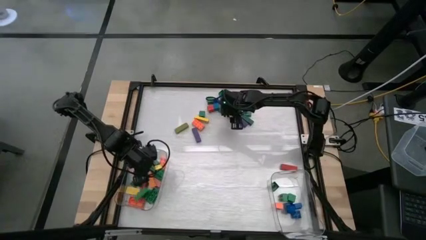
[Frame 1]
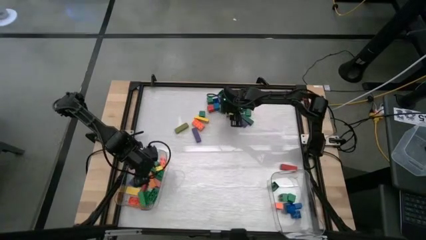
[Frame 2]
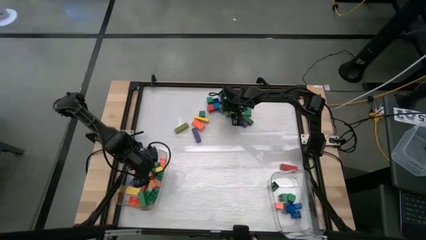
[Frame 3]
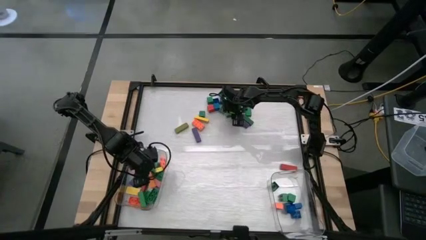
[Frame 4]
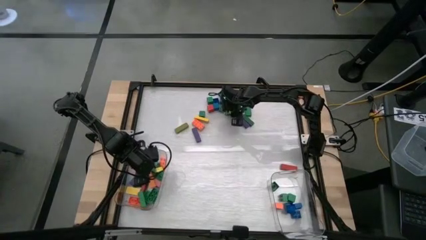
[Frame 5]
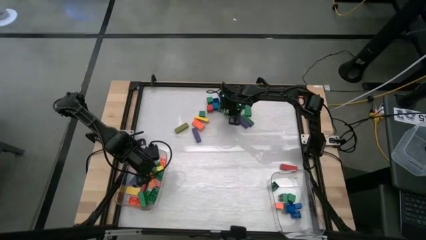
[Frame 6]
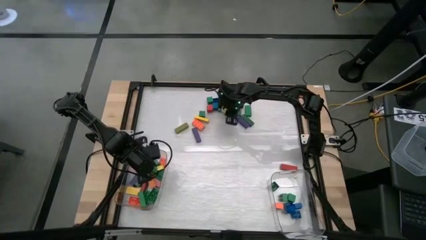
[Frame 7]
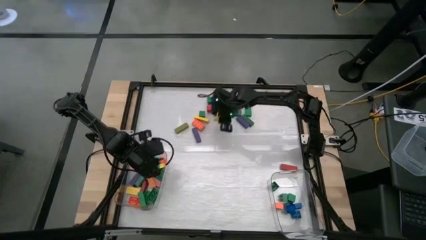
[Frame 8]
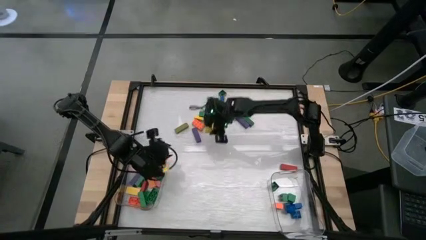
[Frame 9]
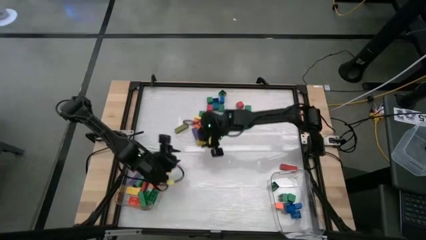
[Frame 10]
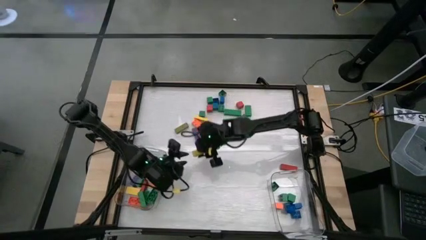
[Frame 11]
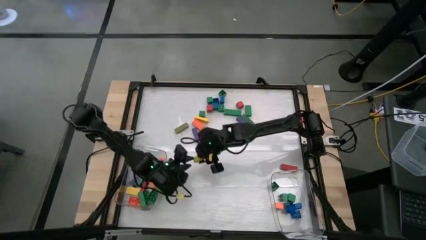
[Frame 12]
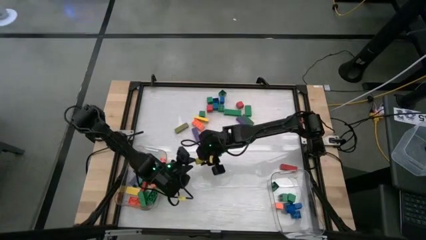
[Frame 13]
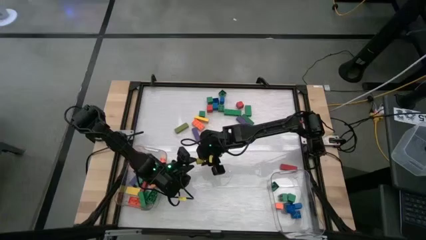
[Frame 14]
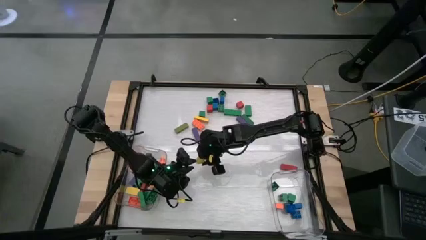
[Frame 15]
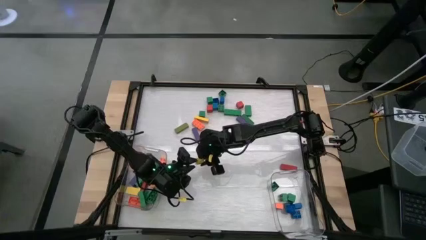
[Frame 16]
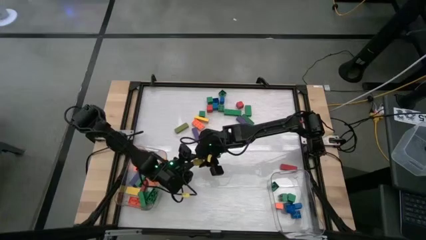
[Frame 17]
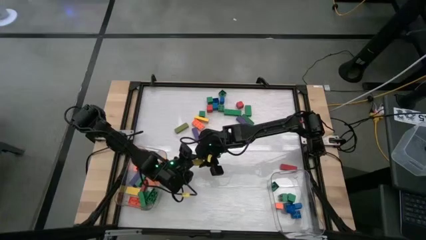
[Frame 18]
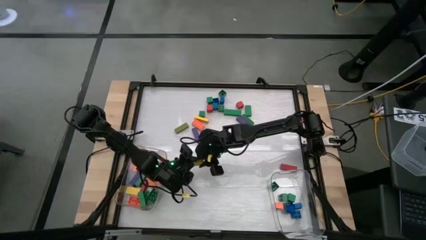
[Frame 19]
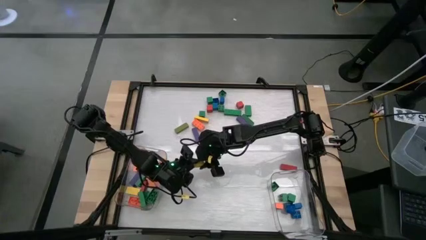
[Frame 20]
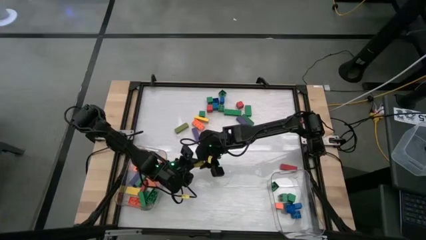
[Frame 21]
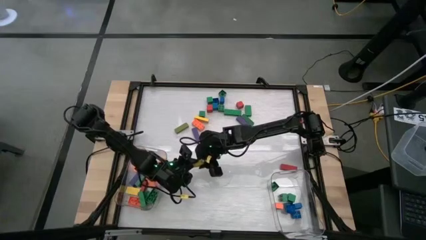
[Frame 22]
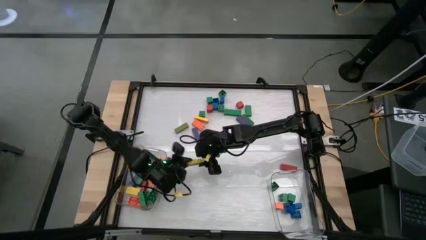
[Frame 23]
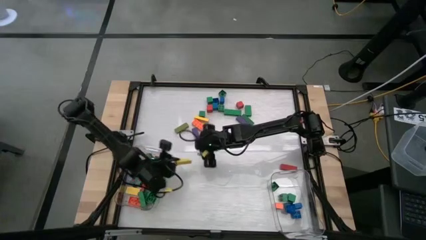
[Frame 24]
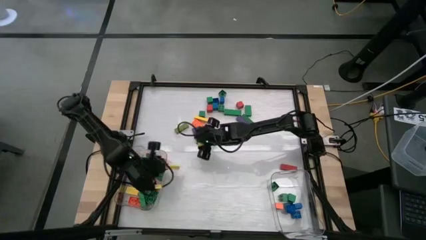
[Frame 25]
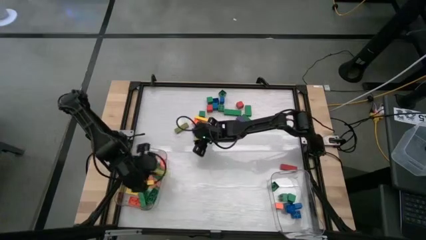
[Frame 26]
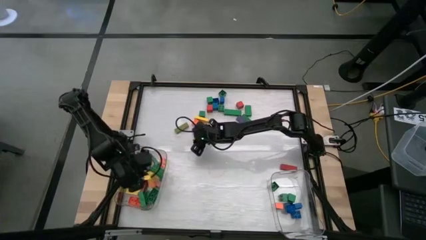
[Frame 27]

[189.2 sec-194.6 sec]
Task: Sort blocks by size
Put the large yellow wooden block into the left transparent bin

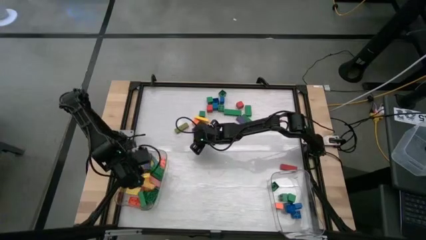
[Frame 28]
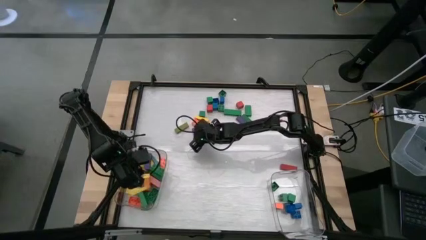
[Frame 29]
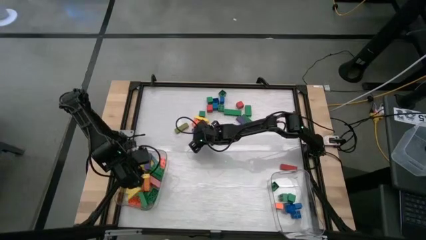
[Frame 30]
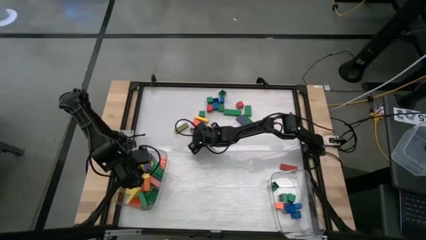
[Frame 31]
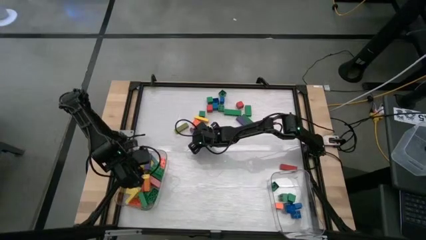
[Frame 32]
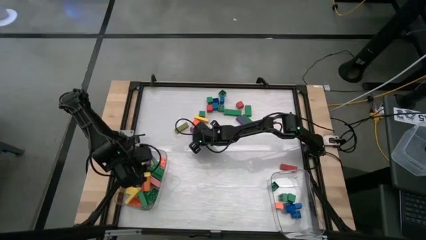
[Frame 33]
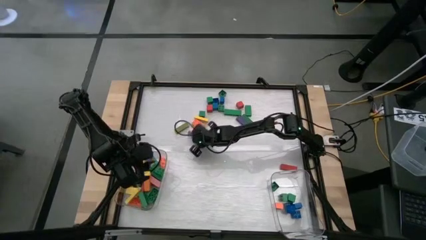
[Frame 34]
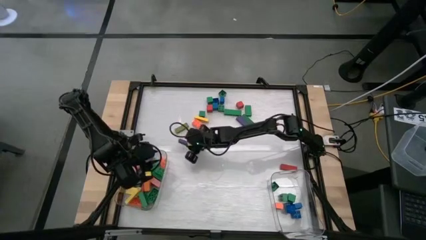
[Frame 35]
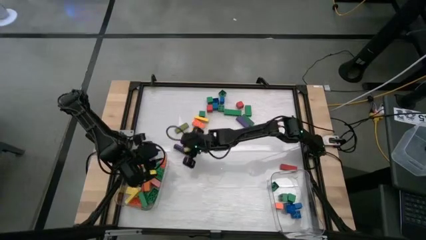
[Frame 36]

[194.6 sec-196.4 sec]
Put the large violet wooden block into the left transparent bin

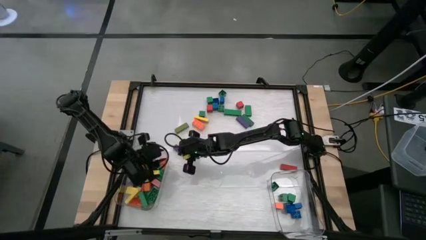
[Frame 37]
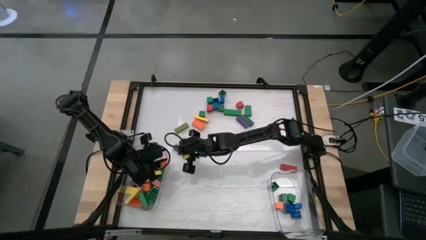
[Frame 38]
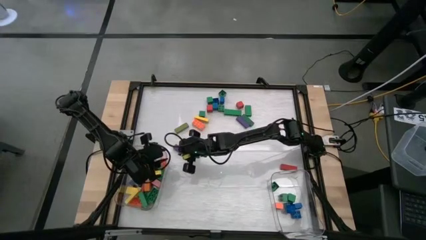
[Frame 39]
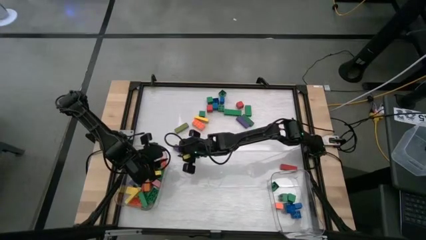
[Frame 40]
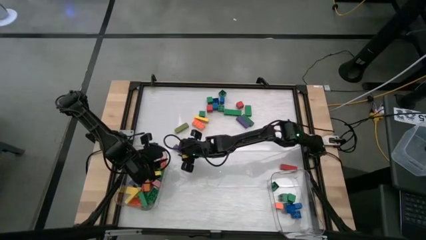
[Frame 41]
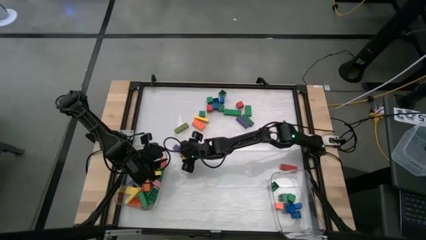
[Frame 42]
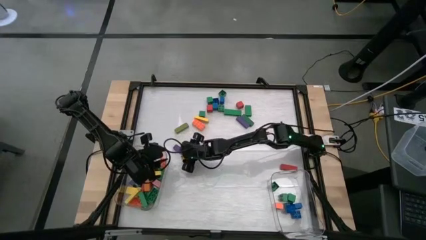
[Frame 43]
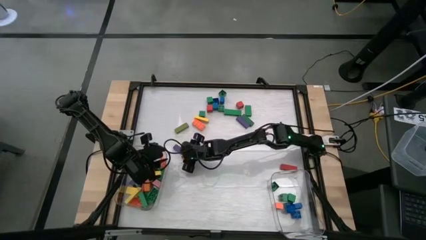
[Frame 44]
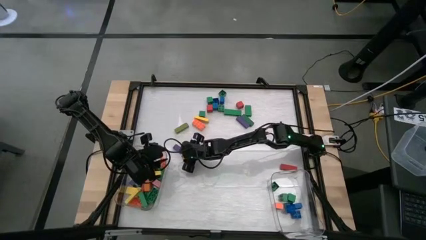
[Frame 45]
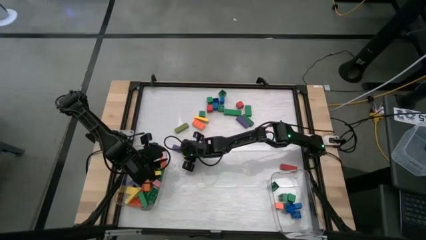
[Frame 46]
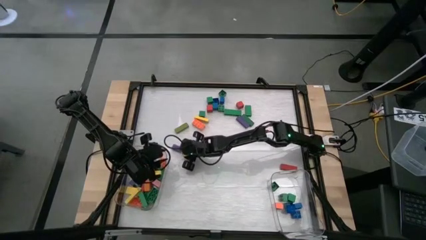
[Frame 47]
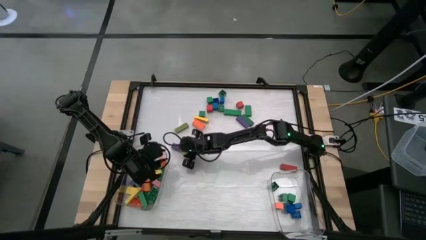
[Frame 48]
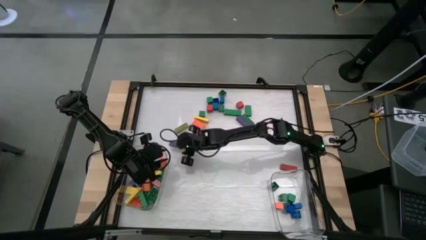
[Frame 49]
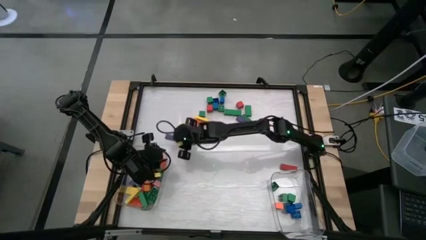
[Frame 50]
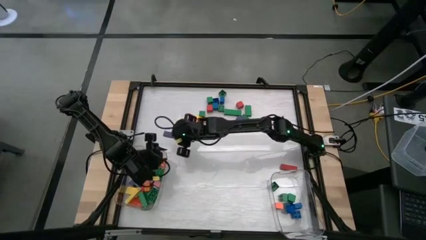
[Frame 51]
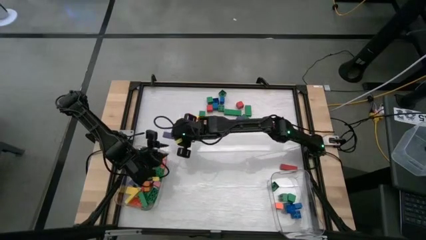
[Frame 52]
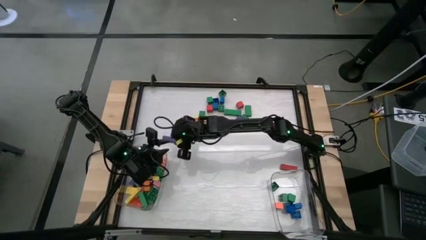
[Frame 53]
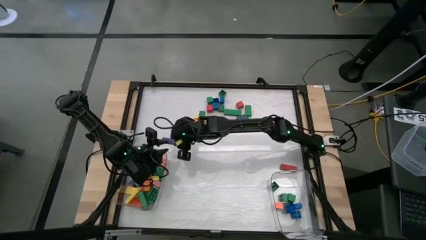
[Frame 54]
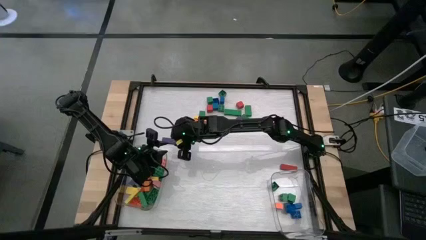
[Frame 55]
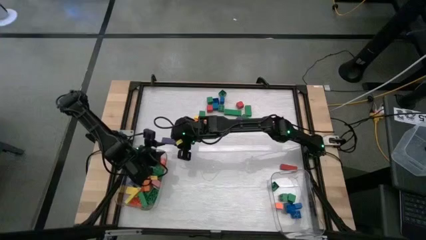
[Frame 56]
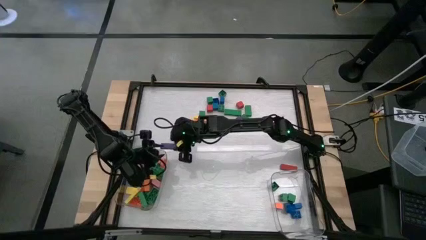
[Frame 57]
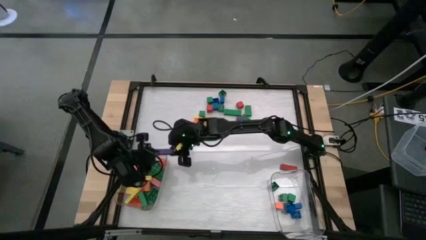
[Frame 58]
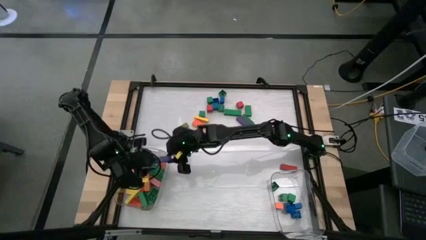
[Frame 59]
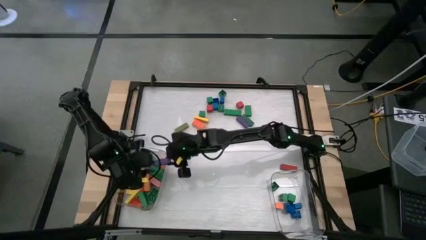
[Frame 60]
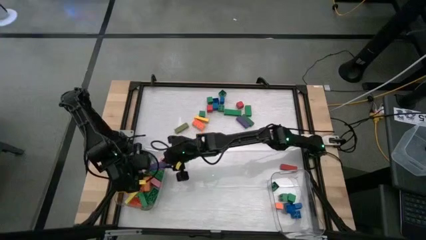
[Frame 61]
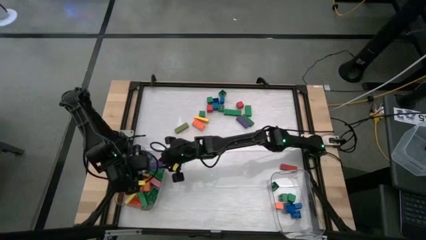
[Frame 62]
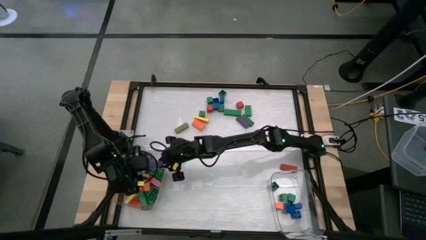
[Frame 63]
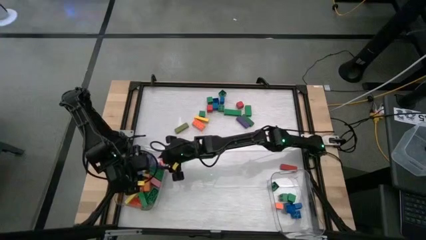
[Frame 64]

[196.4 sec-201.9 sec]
Put the large violet wooden block into the left transparent bin

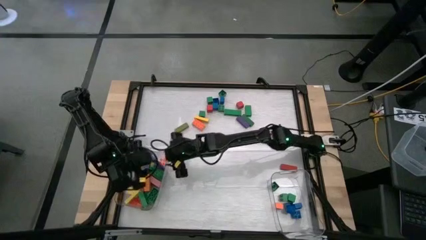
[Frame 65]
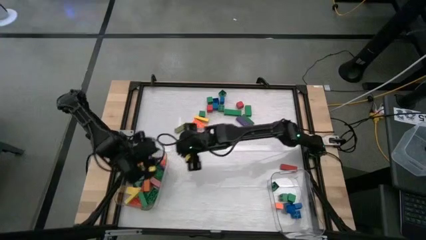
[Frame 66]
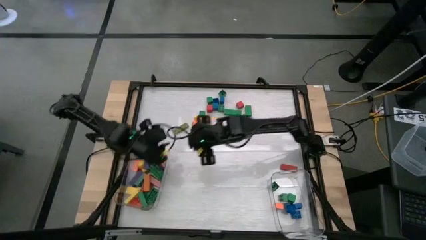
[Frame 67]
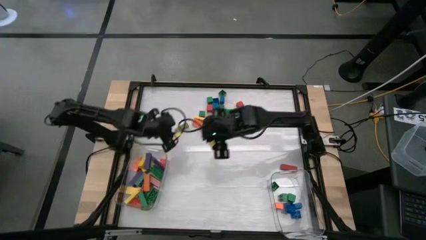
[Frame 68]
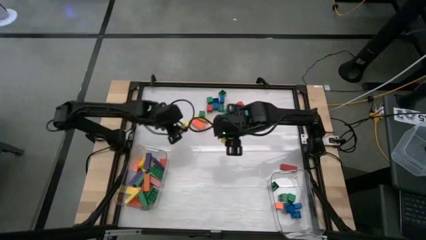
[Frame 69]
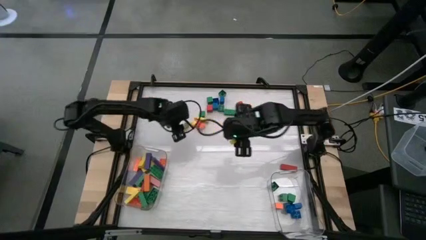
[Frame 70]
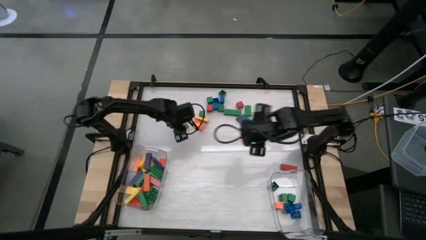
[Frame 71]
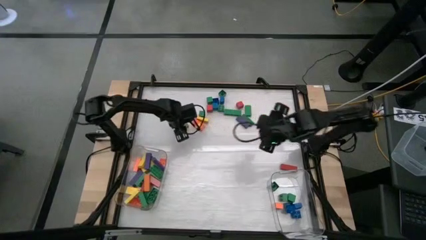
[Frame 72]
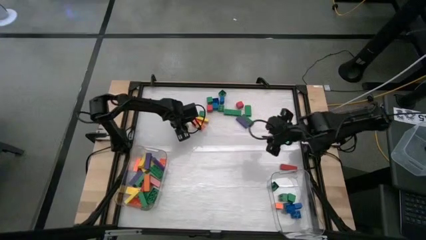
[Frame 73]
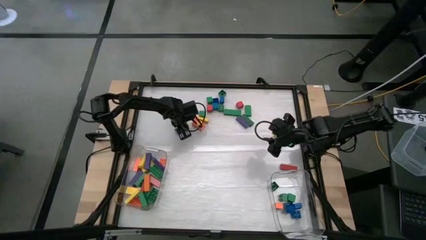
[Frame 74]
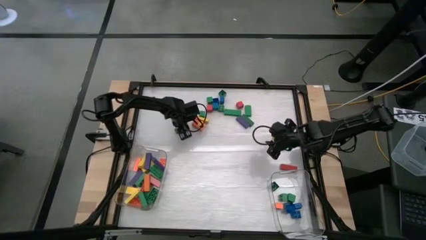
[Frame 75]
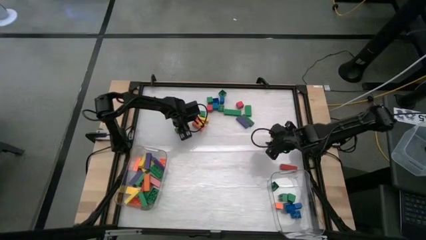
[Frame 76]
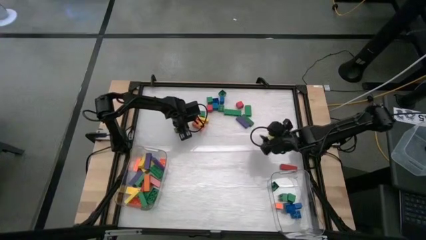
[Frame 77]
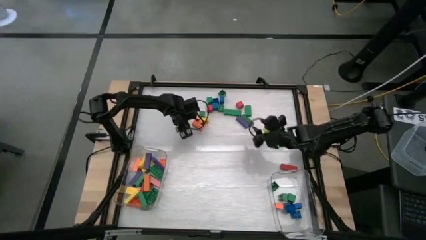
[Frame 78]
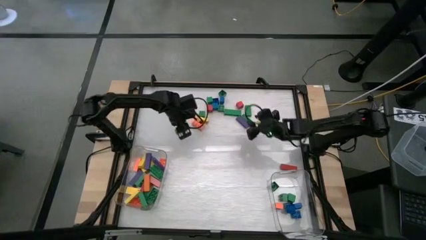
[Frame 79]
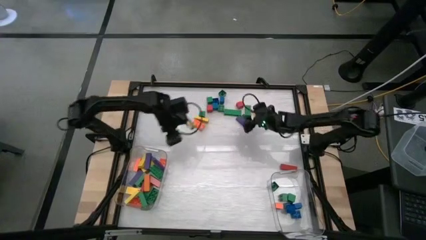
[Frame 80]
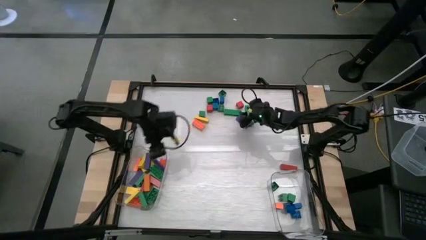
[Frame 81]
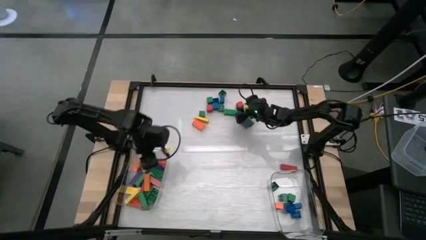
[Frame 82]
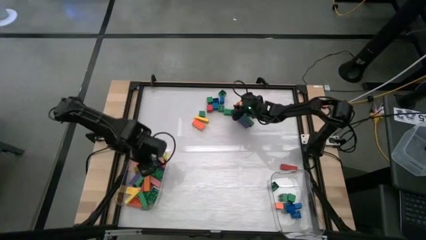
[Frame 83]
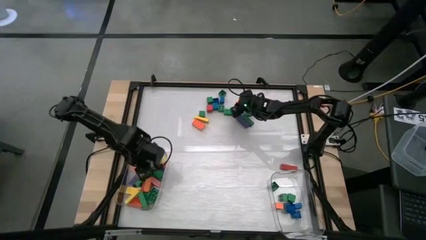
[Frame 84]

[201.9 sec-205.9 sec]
Put the large light green wooden block into the left transparent bin
